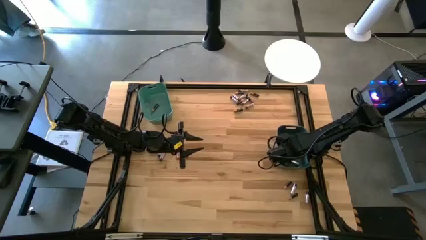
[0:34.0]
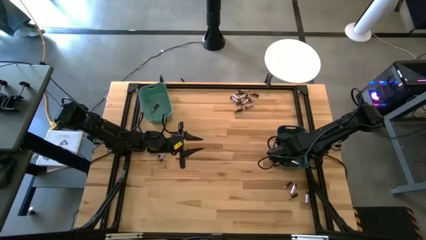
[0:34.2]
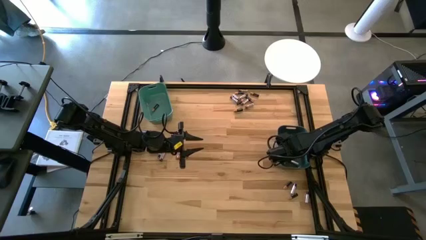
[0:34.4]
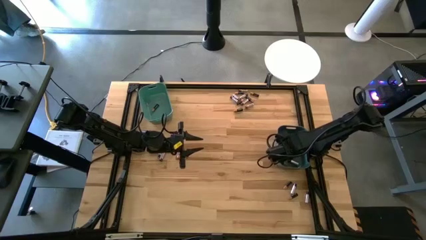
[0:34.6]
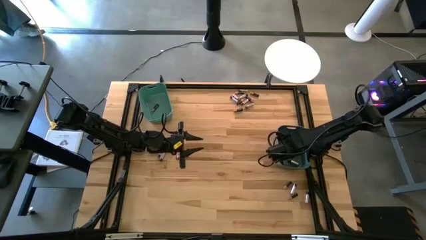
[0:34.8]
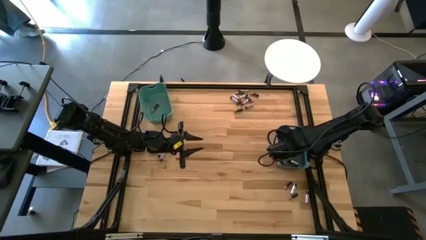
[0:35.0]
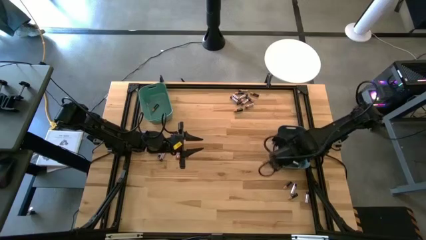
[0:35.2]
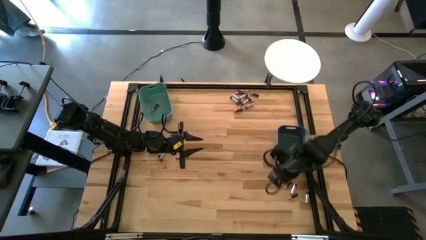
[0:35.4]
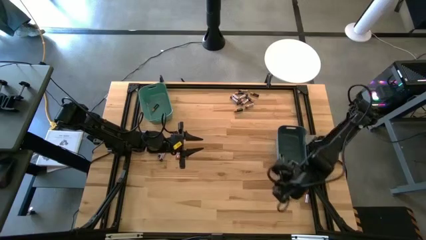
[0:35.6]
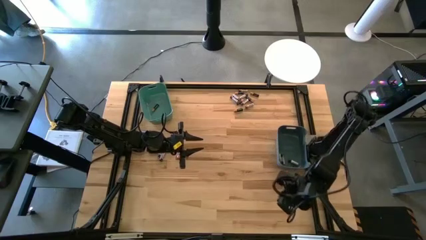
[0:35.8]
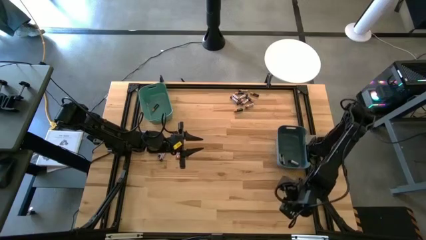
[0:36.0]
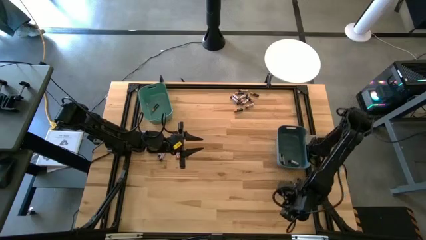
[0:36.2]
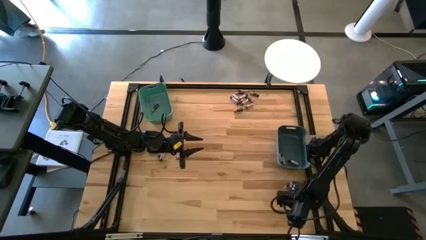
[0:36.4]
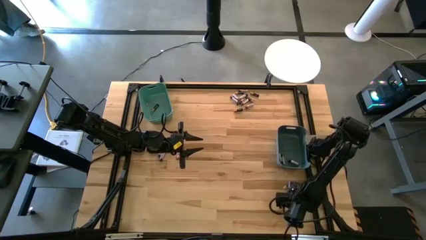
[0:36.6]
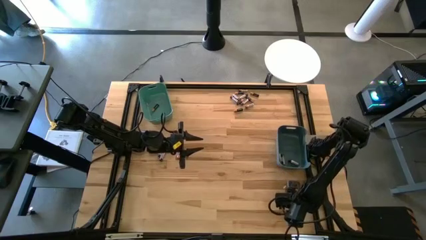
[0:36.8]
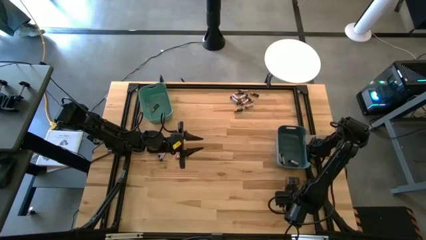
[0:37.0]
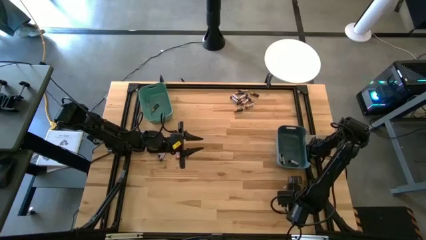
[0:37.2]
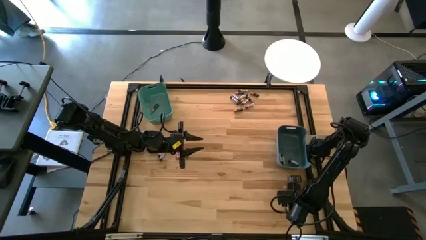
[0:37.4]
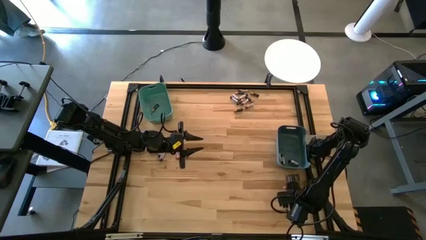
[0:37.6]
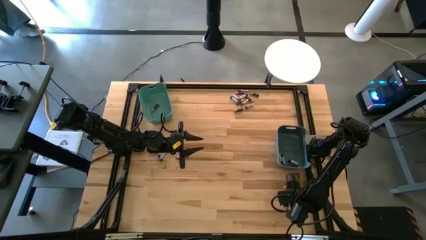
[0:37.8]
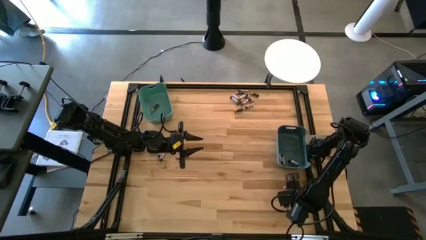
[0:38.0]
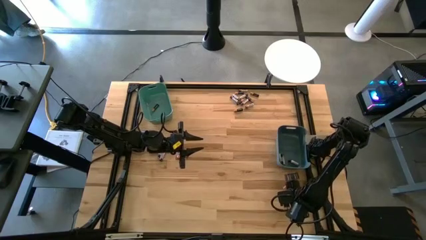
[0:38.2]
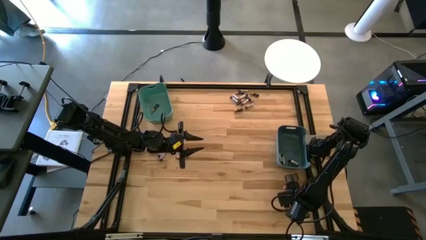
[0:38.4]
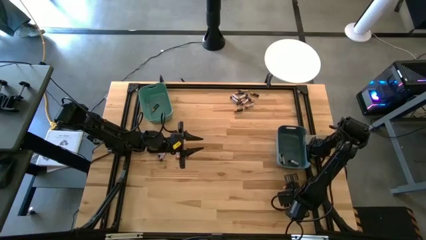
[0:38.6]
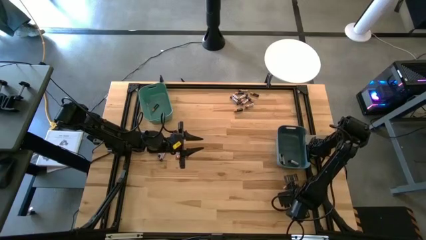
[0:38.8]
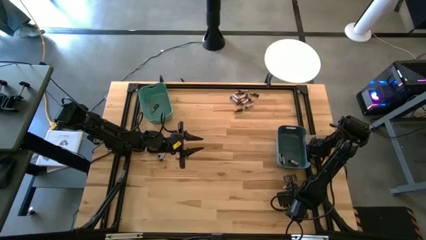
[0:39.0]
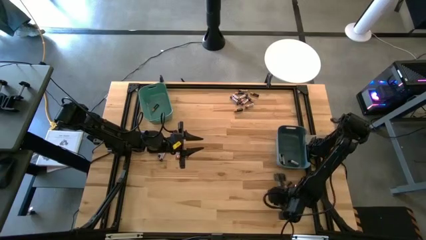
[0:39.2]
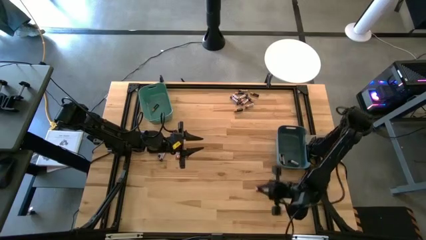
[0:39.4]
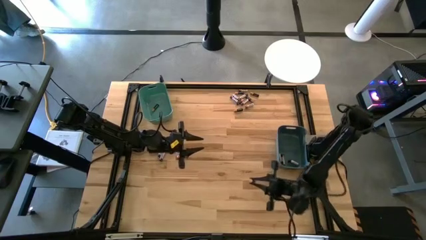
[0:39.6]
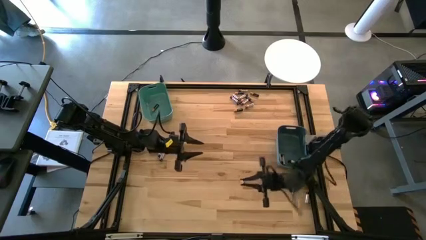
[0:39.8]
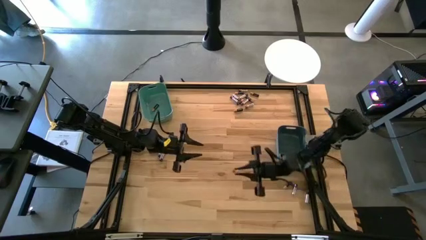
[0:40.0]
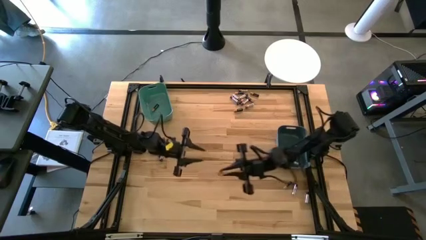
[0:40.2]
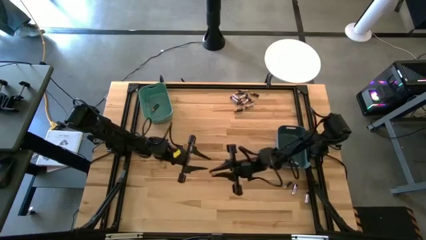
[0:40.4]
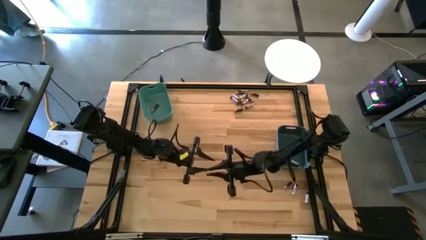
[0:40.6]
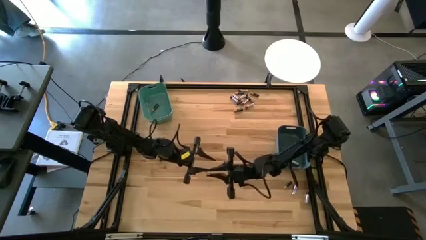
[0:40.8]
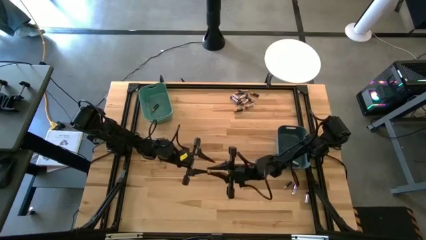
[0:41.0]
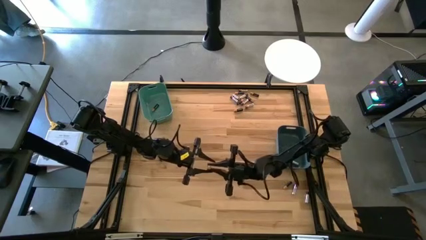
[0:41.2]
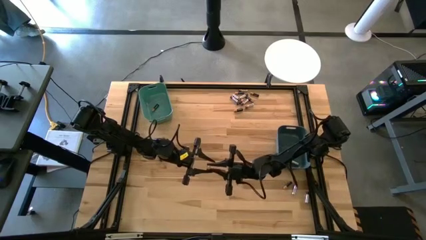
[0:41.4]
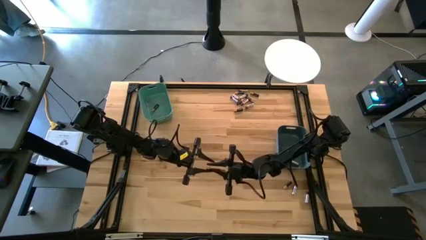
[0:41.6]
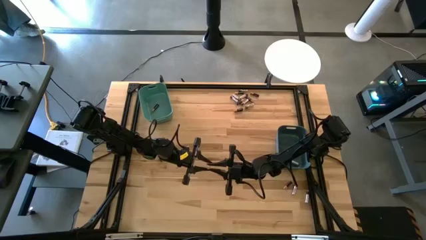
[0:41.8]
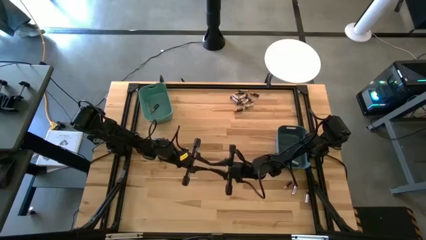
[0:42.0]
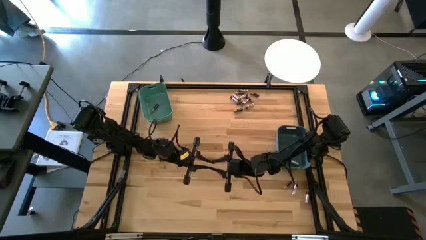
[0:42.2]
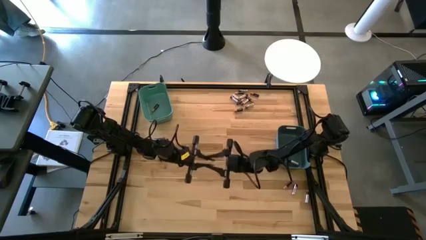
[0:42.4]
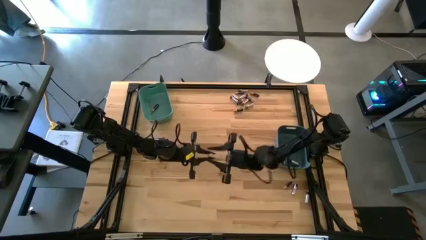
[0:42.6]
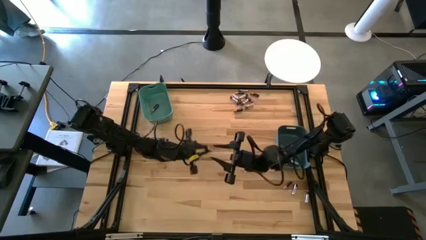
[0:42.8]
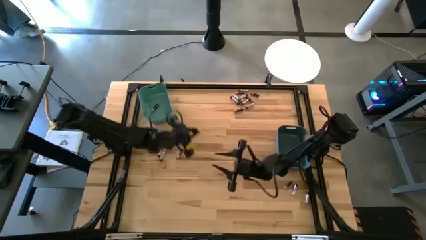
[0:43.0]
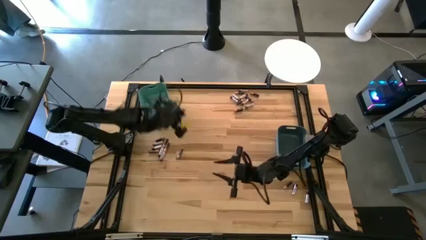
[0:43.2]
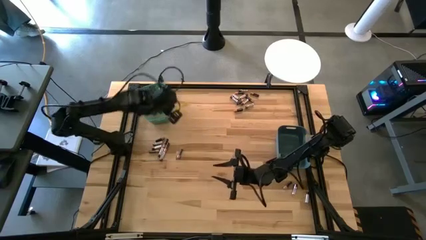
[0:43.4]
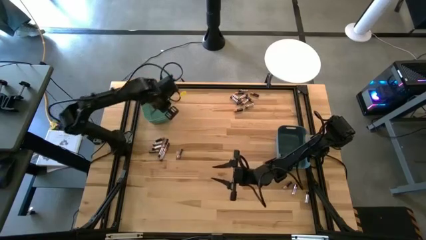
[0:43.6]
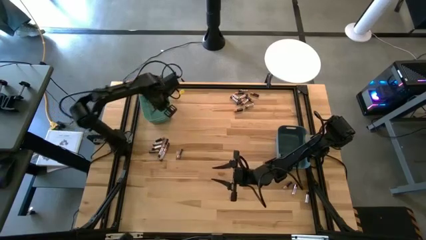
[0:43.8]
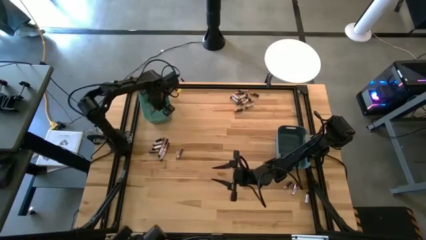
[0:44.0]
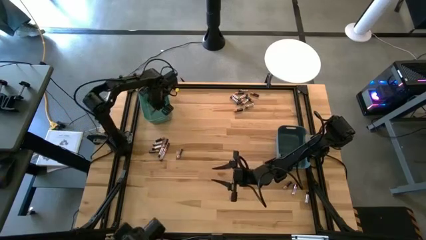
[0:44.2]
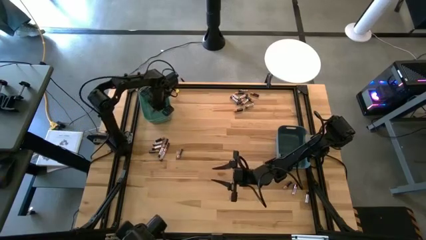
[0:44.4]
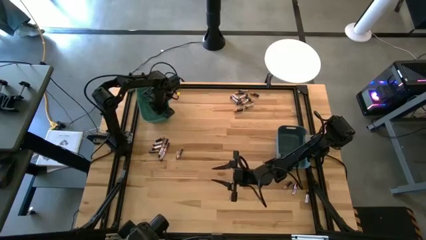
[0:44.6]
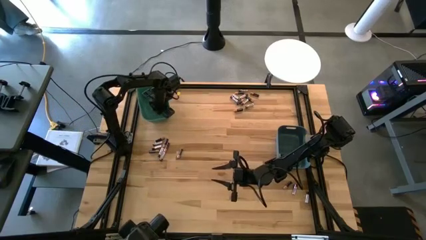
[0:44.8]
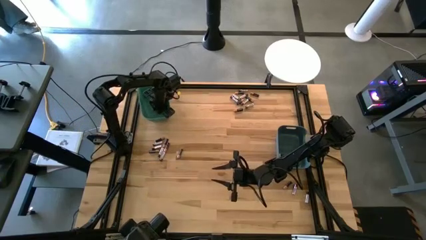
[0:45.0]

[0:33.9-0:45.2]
Task: Sort batteries
Put the black battery into the green bin

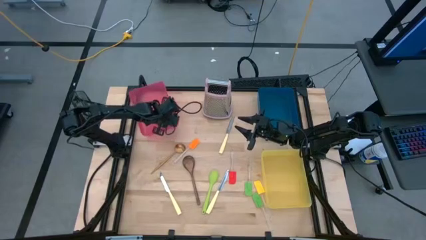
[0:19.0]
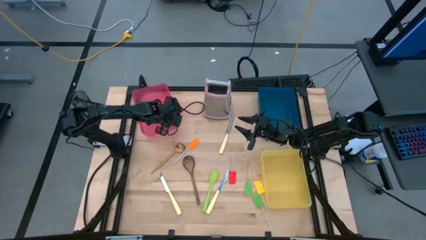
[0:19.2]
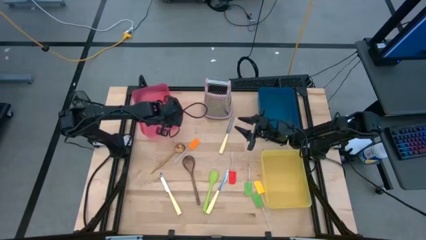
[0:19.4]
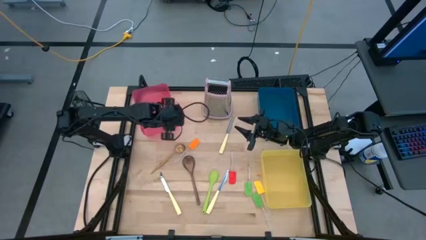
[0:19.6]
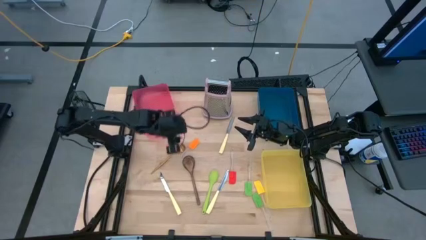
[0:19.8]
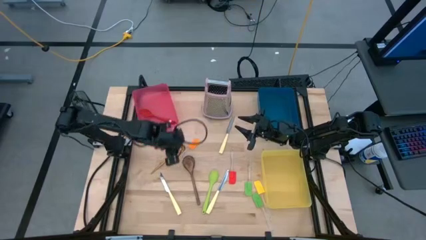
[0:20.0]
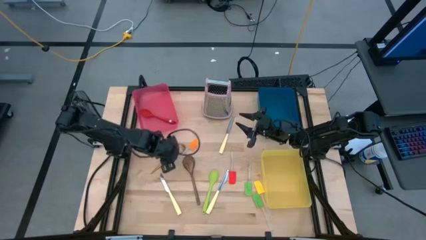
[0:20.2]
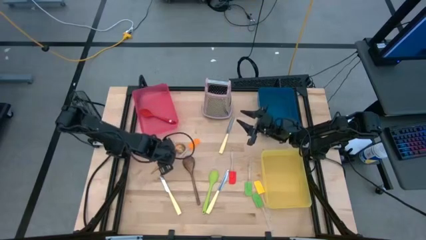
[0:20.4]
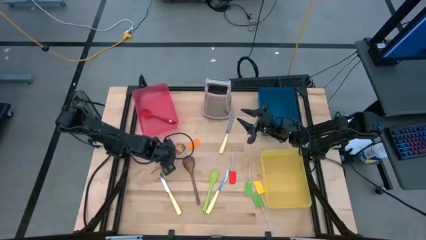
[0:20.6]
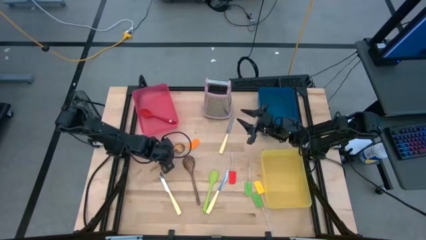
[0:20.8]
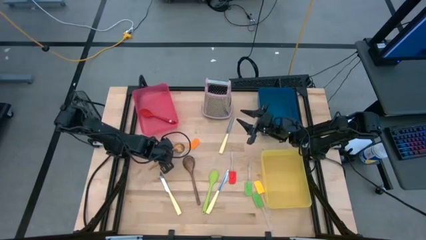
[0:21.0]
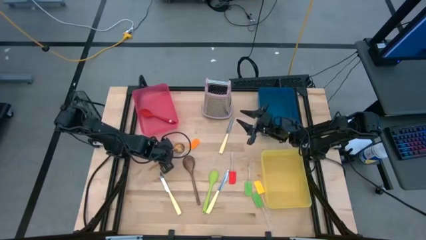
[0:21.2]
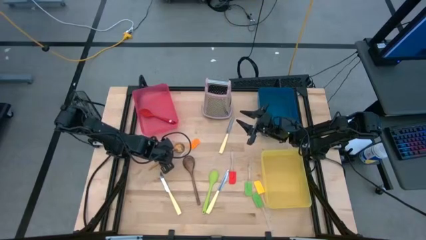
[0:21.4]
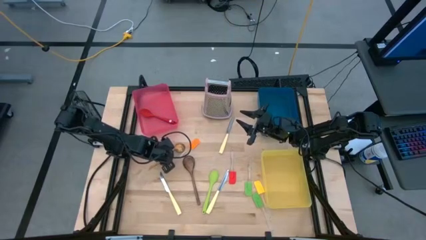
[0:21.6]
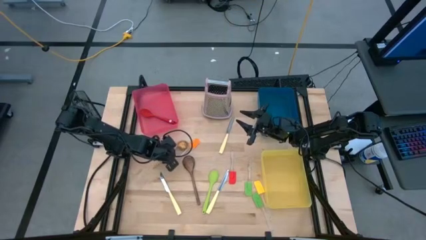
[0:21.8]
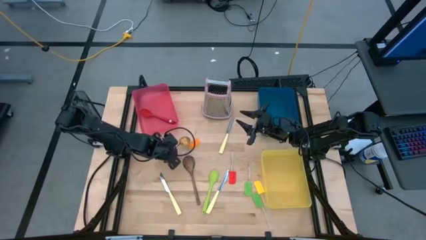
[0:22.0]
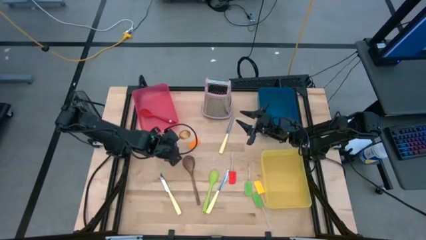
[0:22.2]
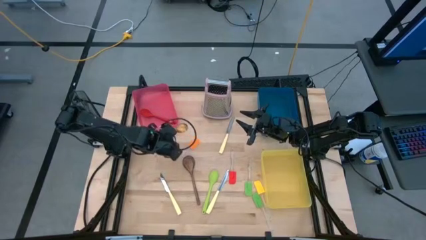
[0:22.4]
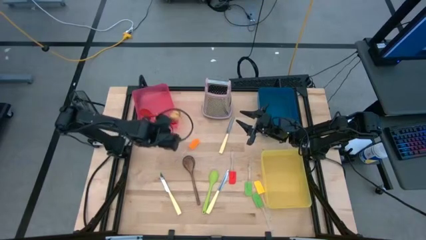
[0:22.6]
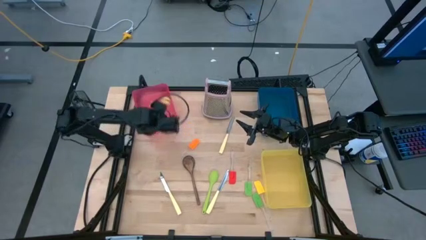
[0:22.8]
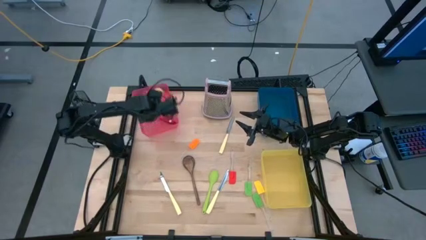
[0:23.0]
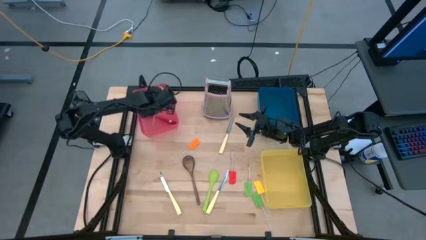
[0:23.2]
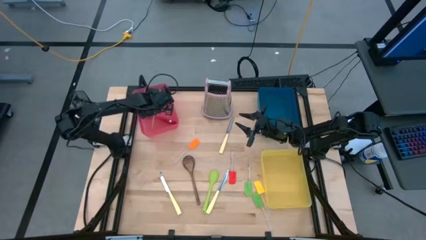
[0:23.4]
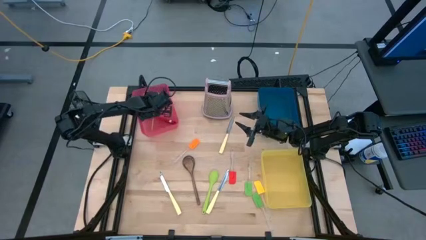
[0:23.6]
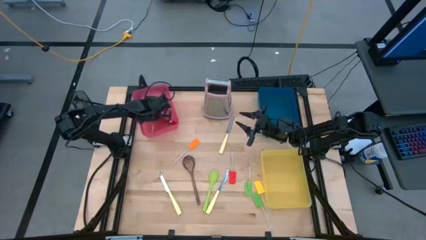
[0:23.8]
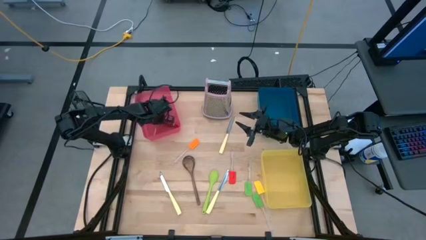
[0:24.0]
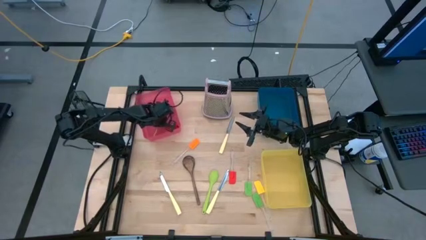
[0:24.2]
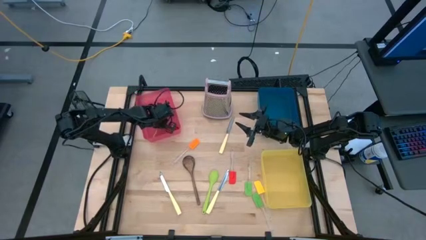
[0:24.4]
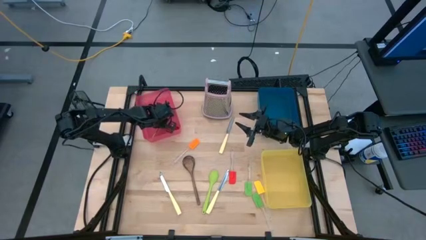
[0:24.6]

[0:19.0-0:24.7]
Task: Pick & Place Kitchen Items
Put the gold serving spoon into the pink bin
